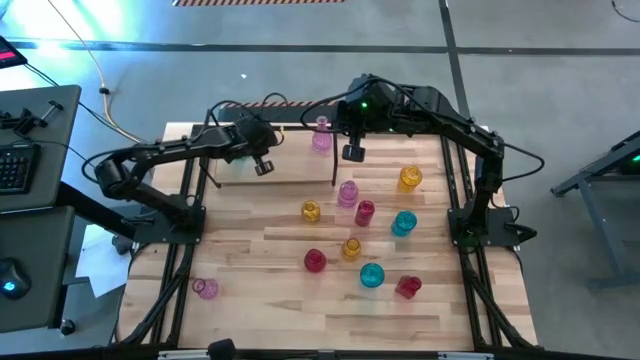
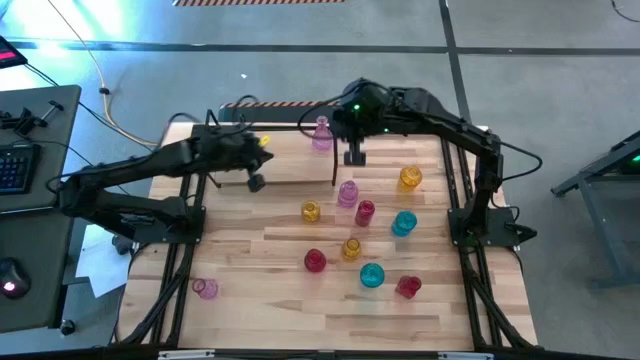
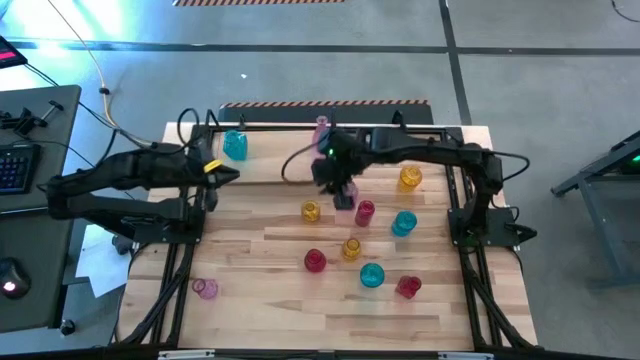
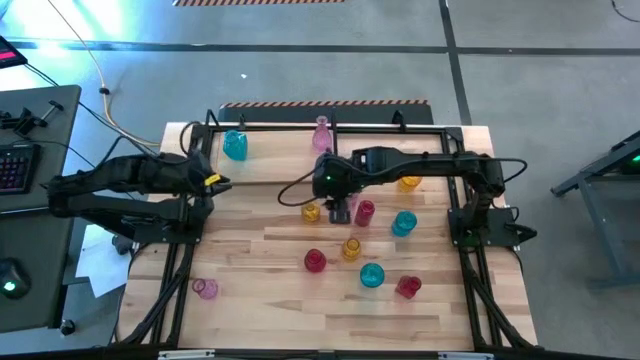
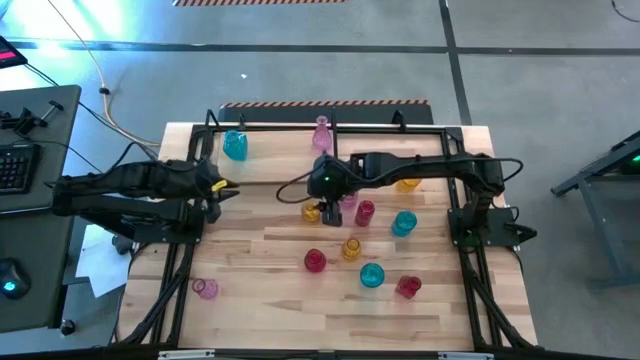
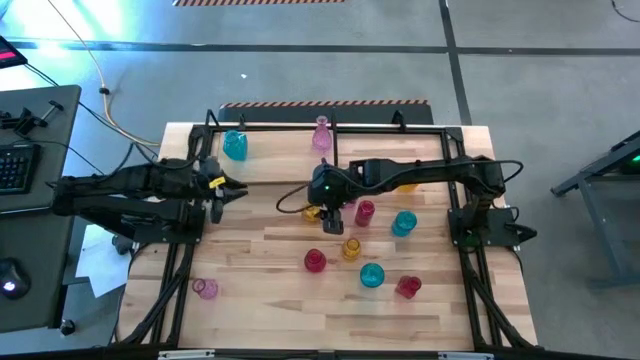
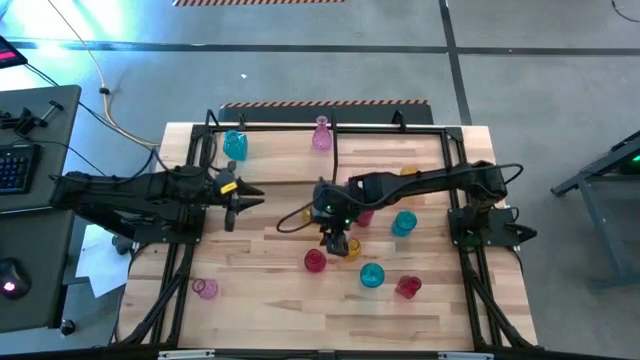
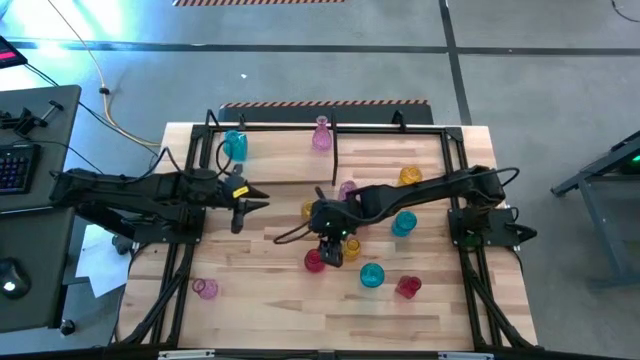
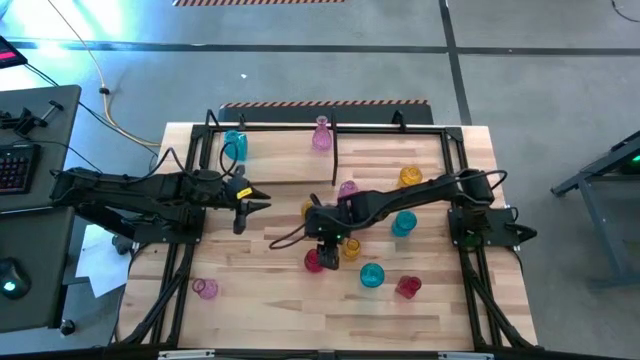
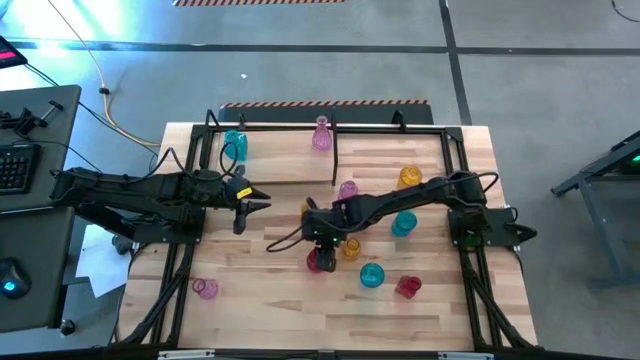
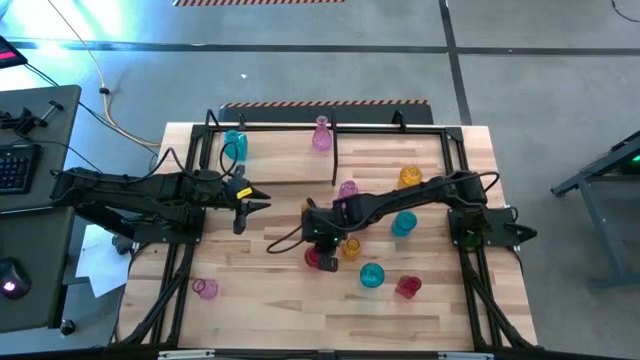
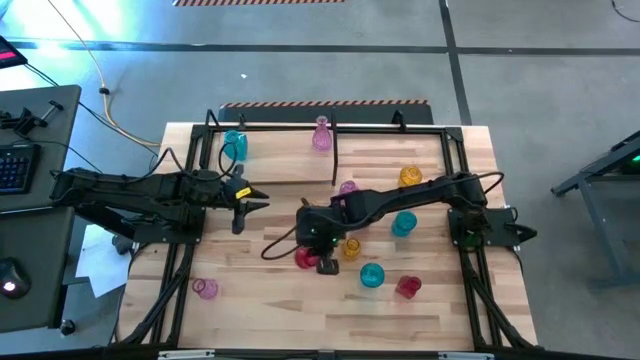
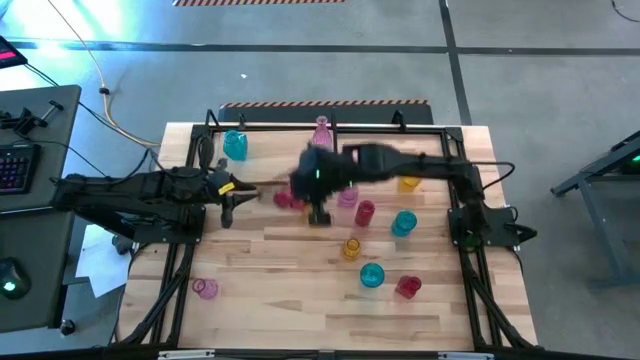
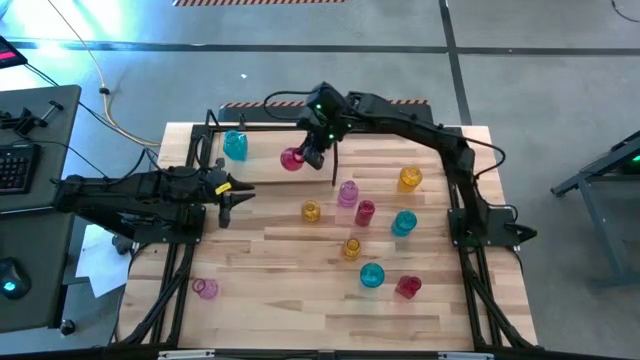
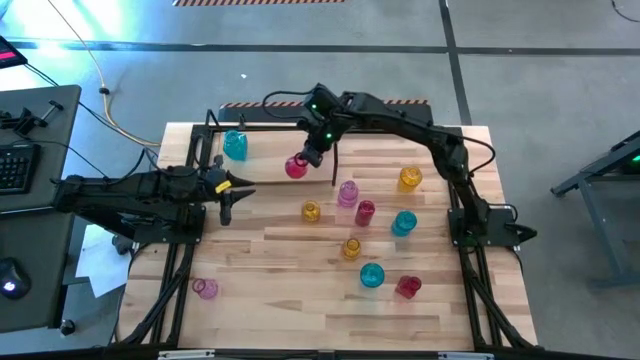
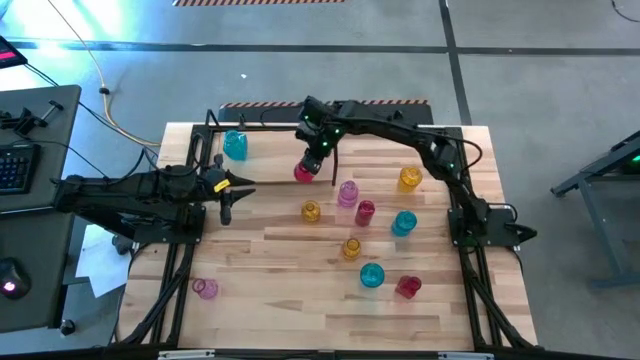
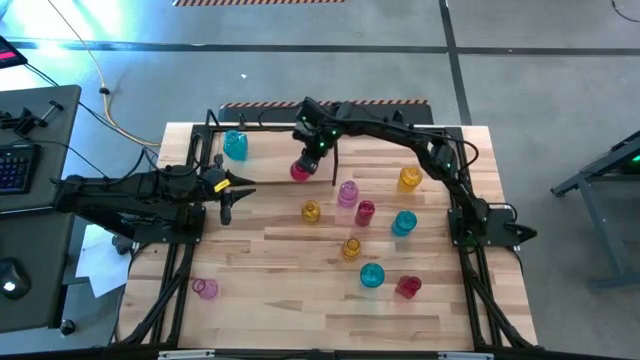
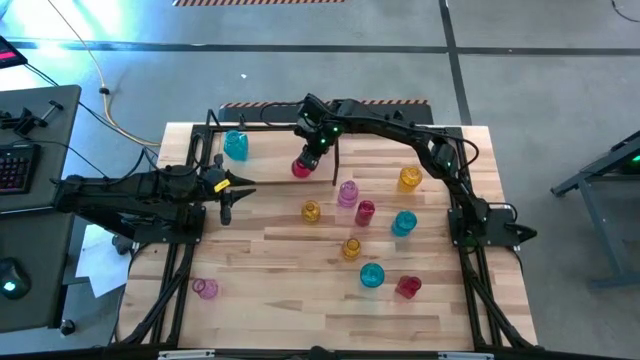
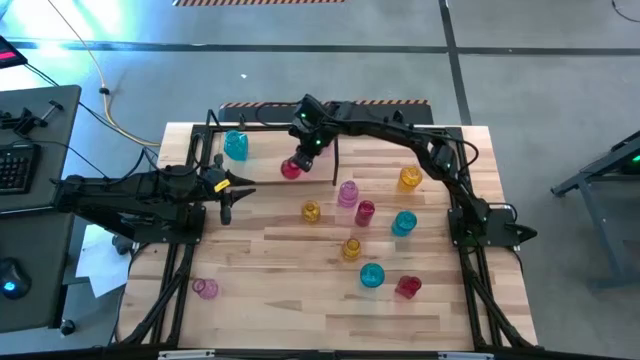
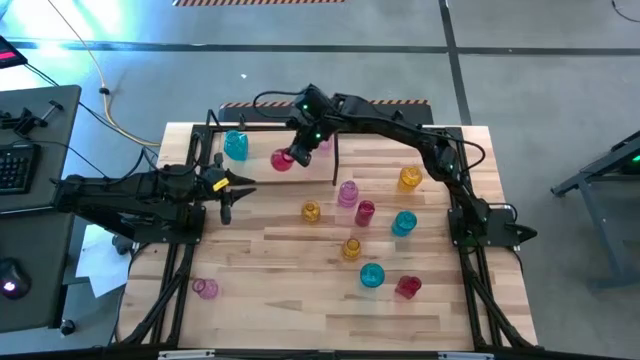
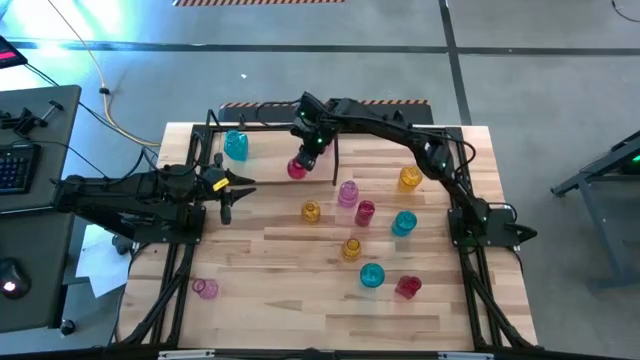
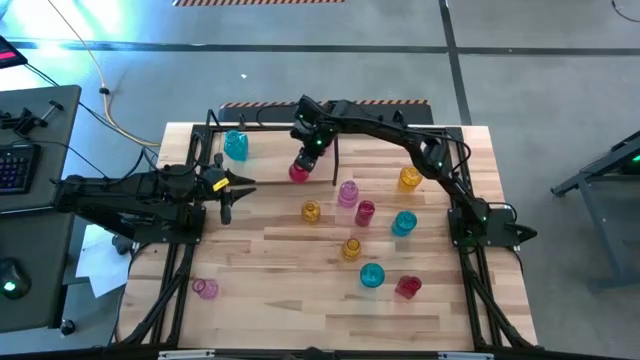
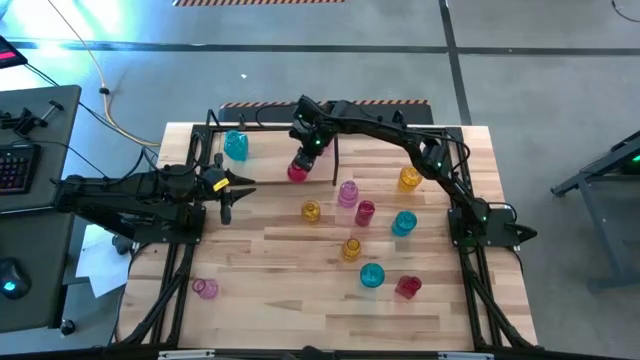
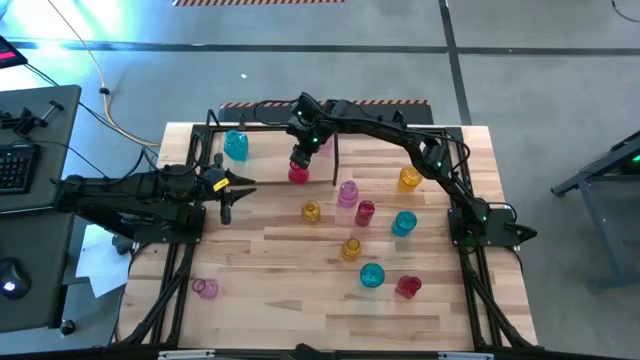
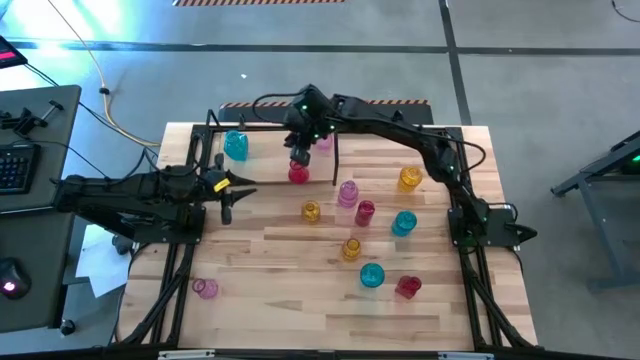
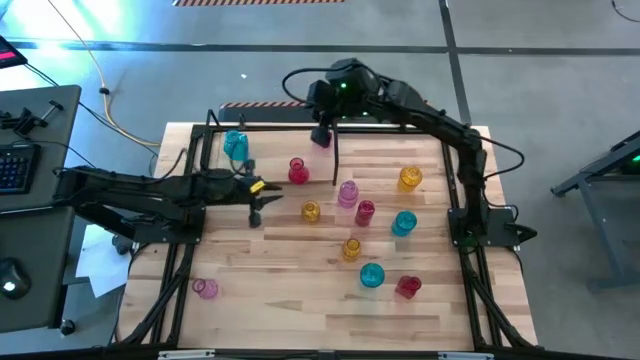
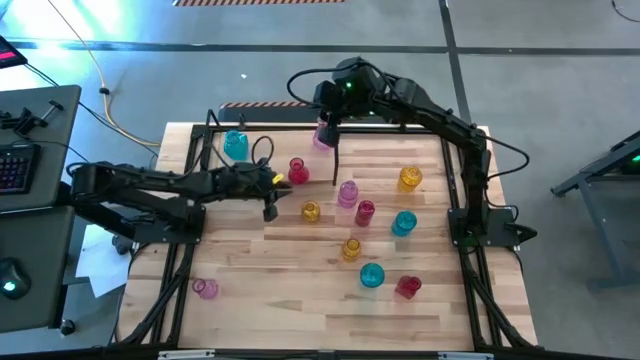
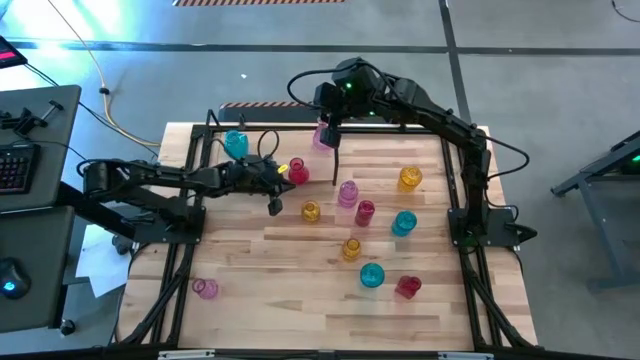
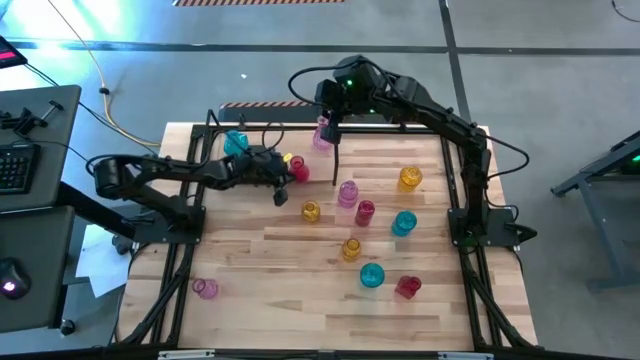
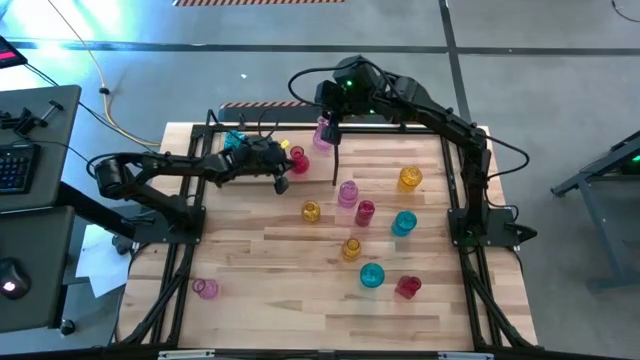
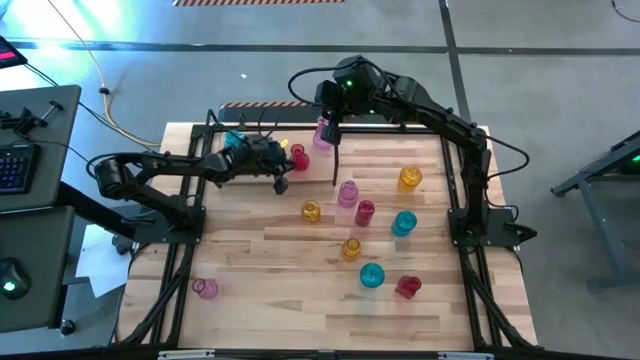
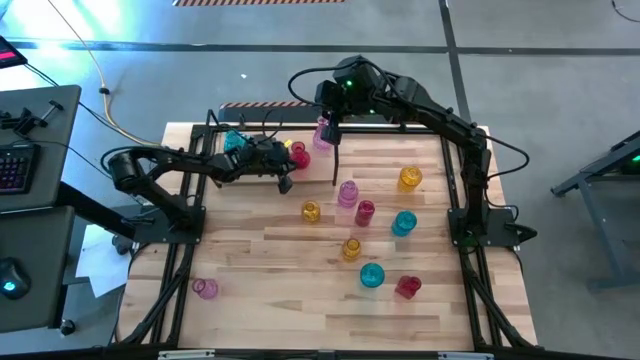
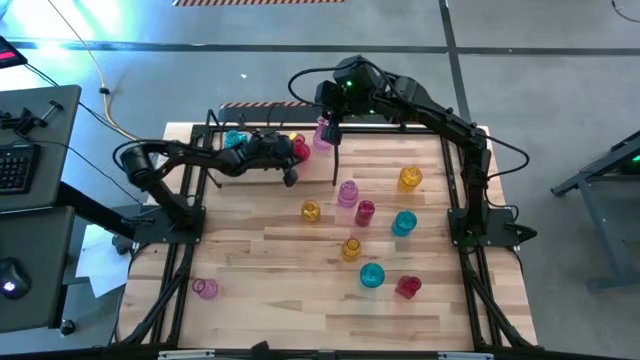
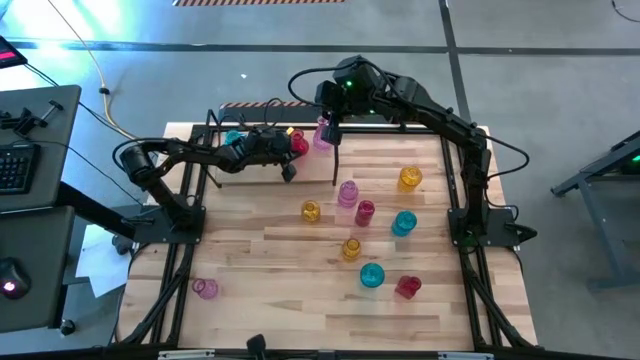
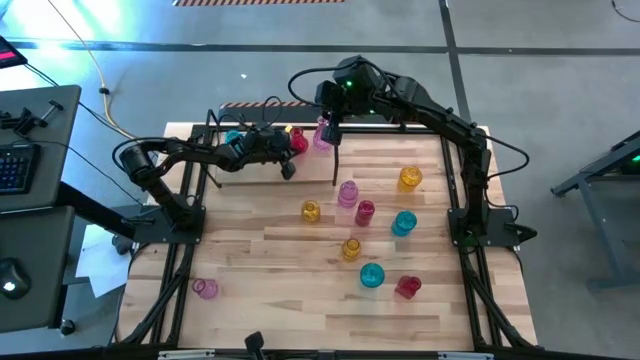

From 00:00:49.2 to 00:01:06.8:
Task: sort vases onto shelf
Put the middle left red vase on the shelf

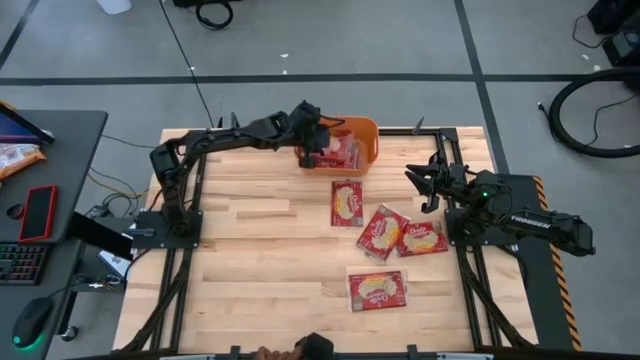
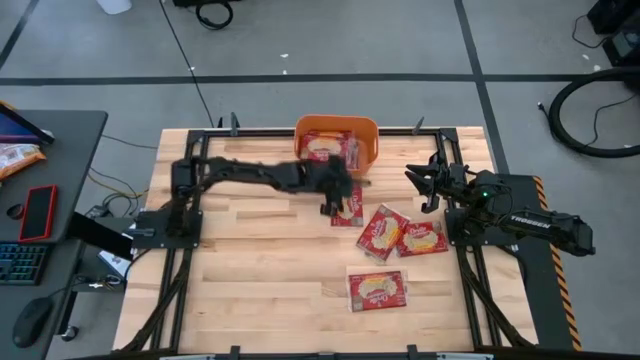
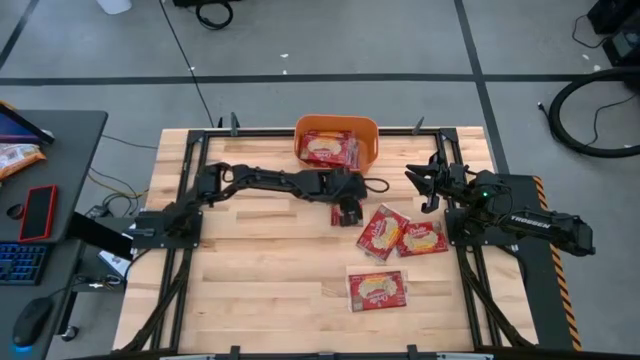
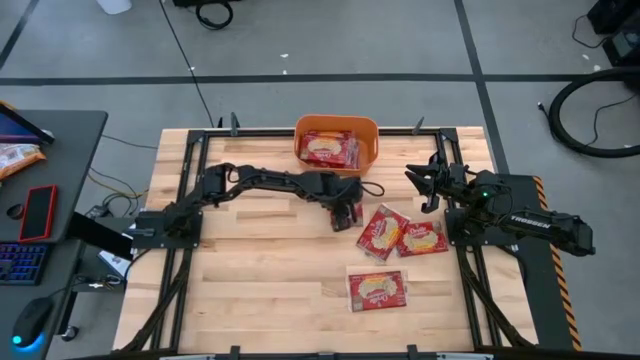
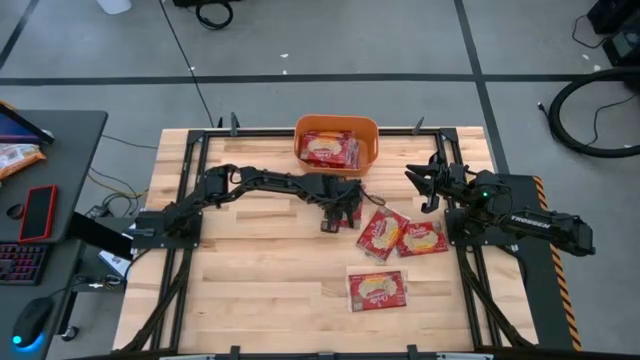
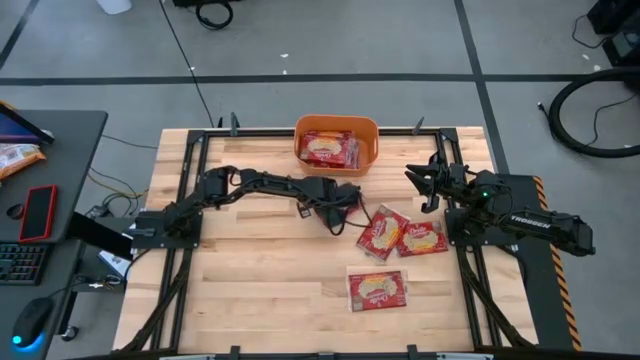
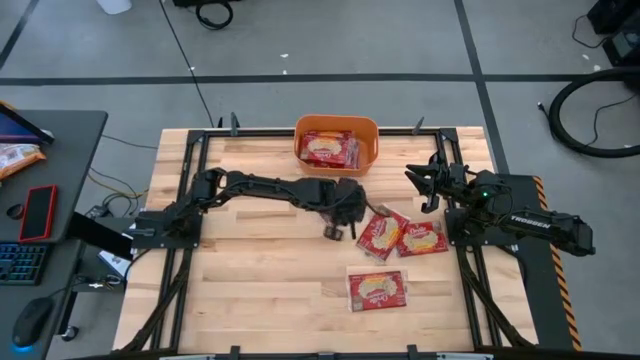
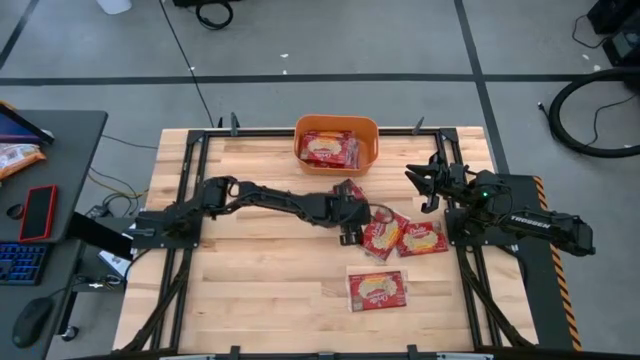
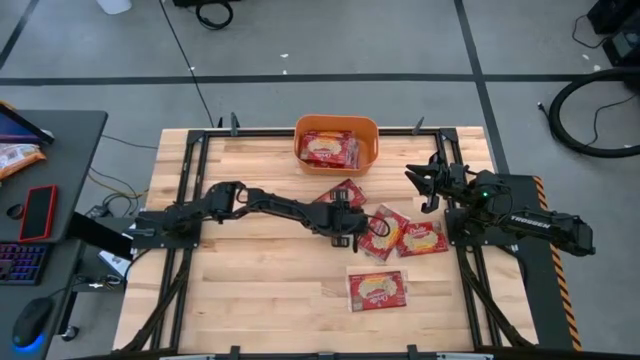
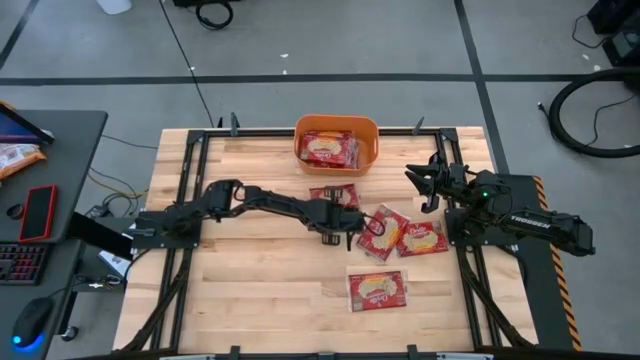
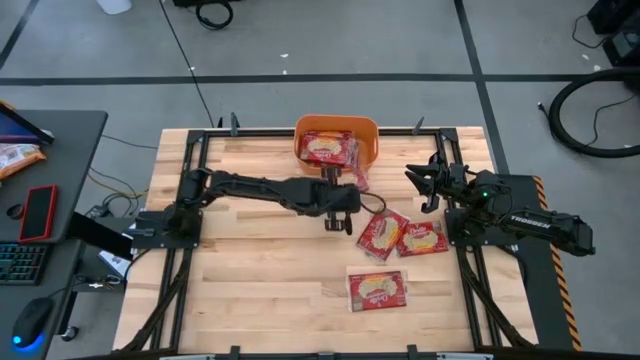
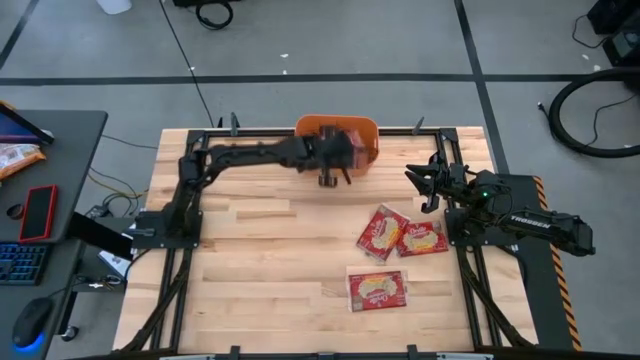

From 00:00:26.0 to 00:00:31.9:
Task: Sort popcorn bags into baskets
Put the red popcorn bag into the orange bin
